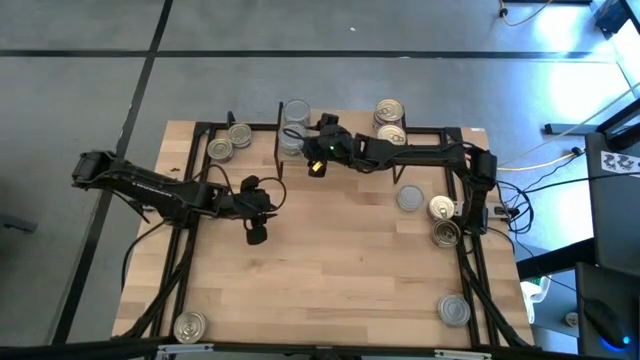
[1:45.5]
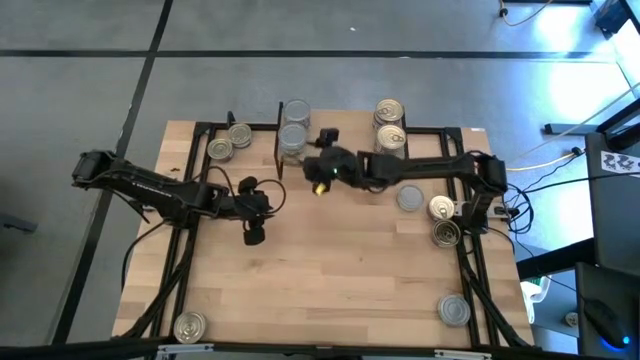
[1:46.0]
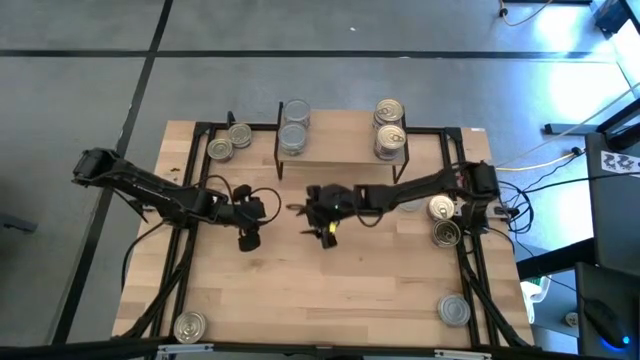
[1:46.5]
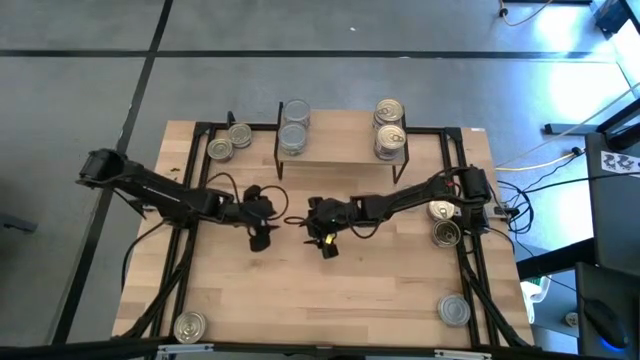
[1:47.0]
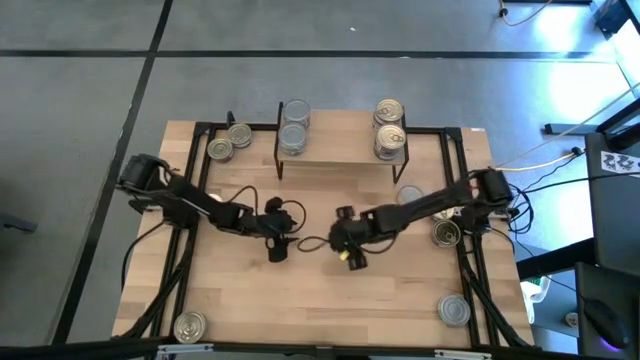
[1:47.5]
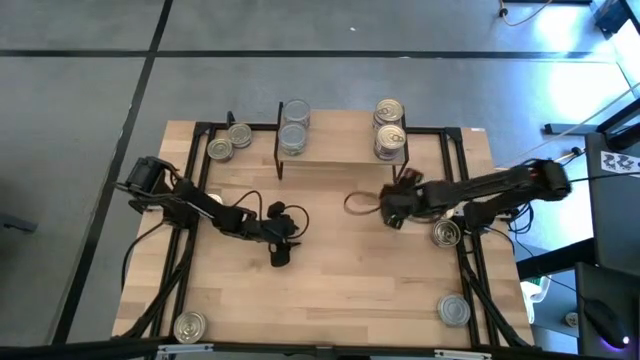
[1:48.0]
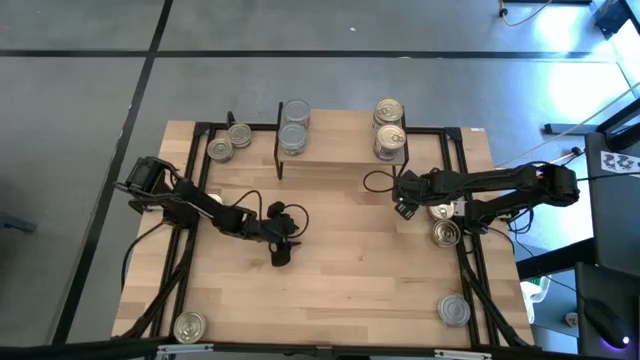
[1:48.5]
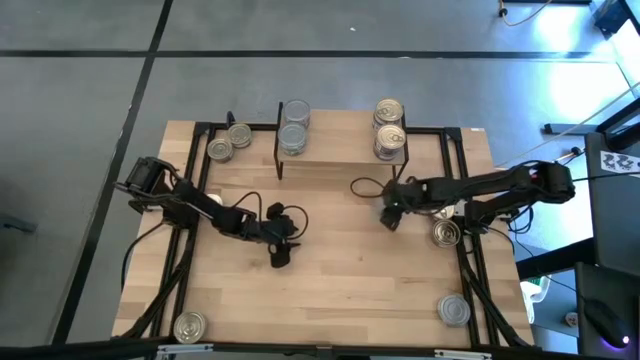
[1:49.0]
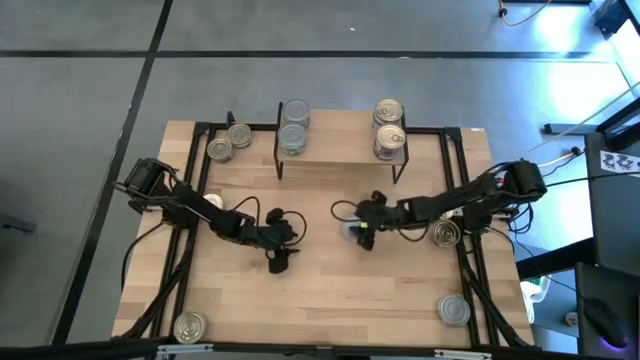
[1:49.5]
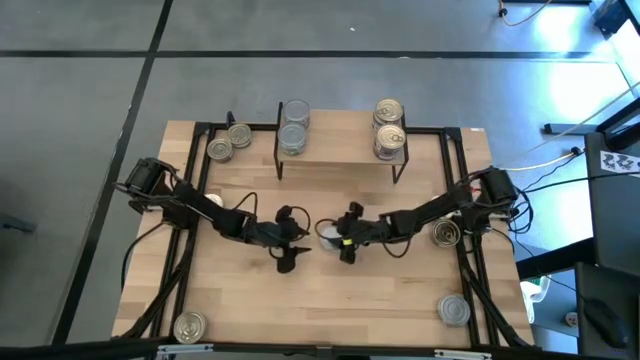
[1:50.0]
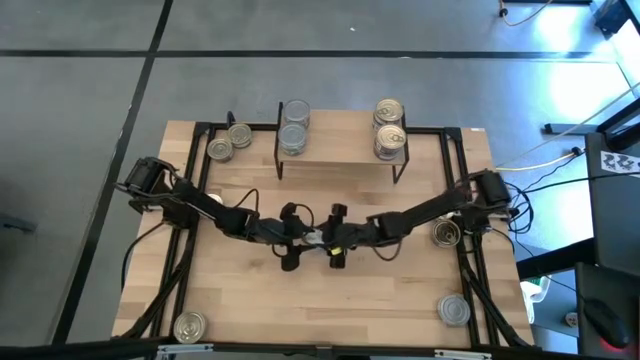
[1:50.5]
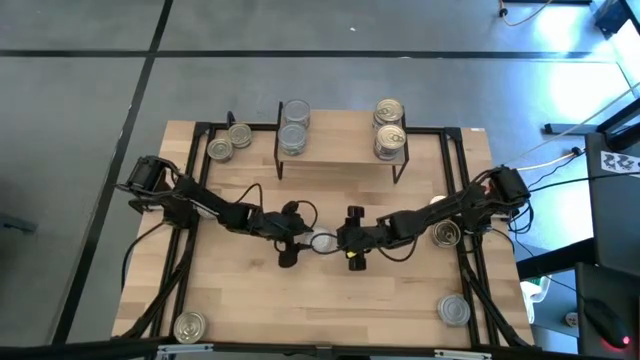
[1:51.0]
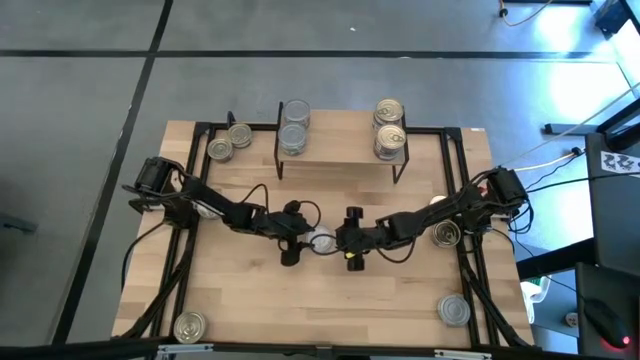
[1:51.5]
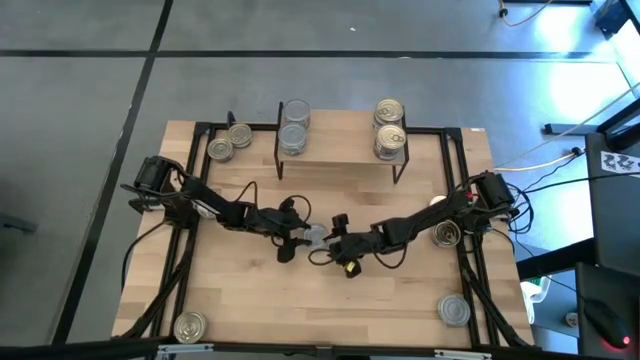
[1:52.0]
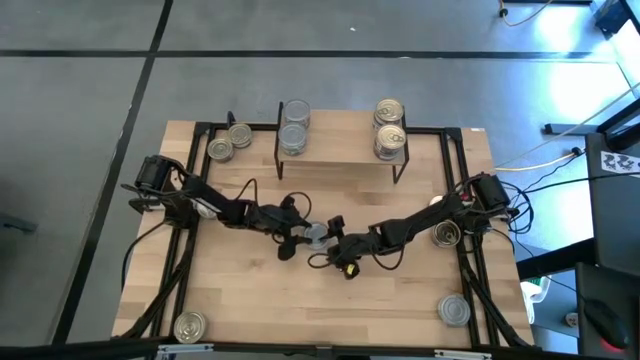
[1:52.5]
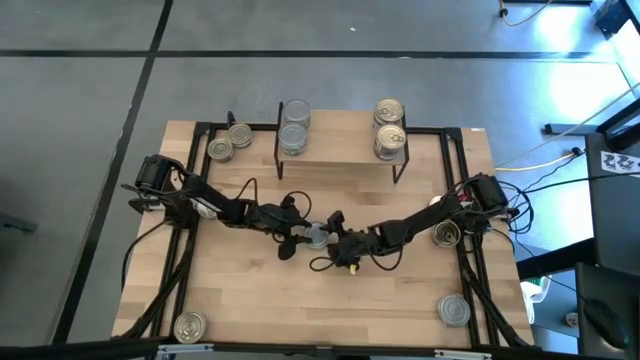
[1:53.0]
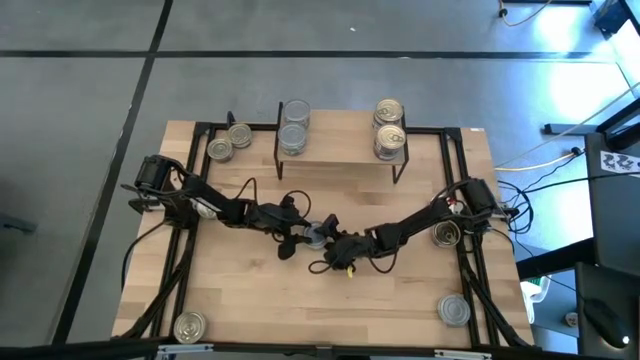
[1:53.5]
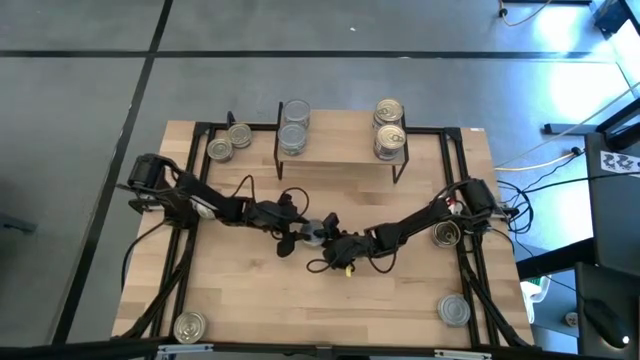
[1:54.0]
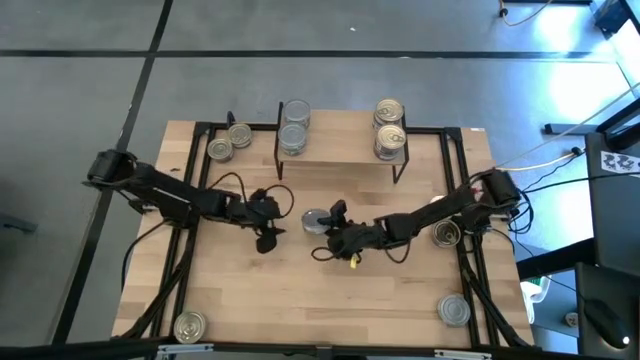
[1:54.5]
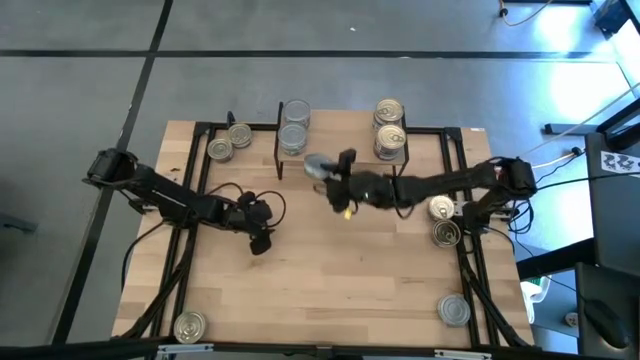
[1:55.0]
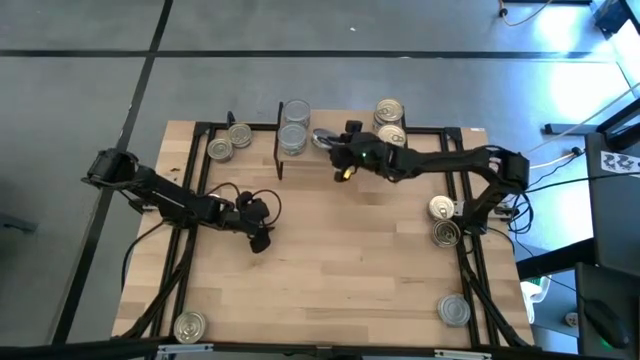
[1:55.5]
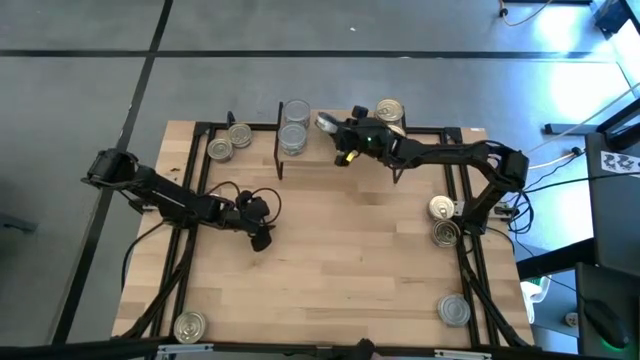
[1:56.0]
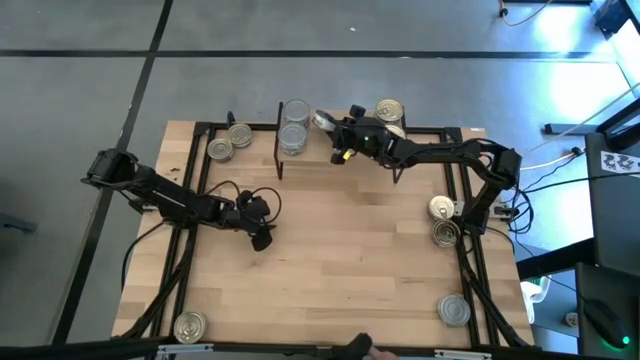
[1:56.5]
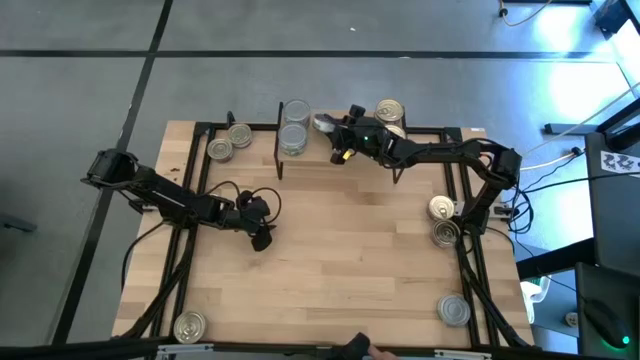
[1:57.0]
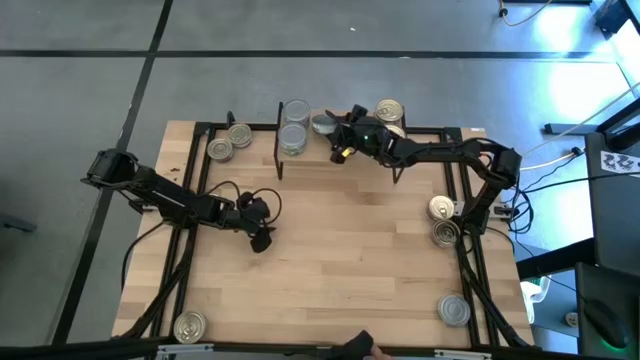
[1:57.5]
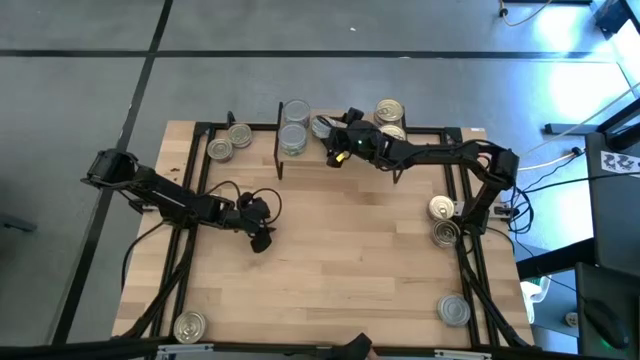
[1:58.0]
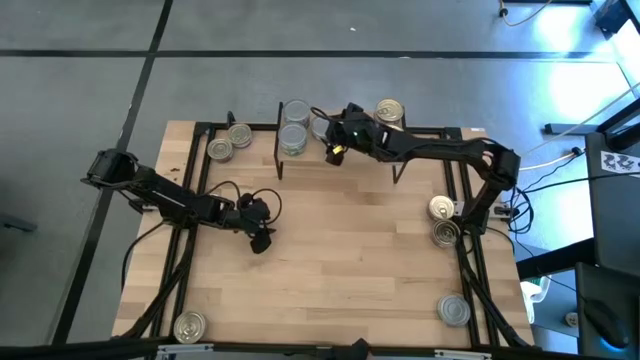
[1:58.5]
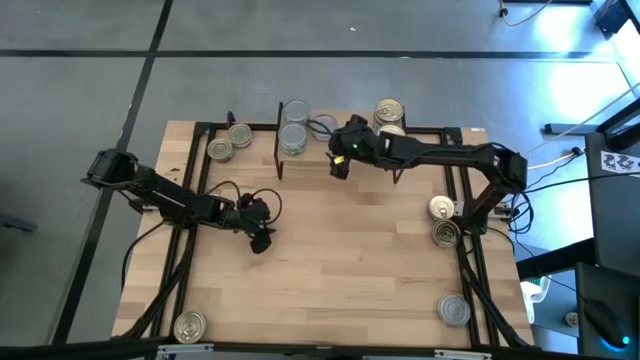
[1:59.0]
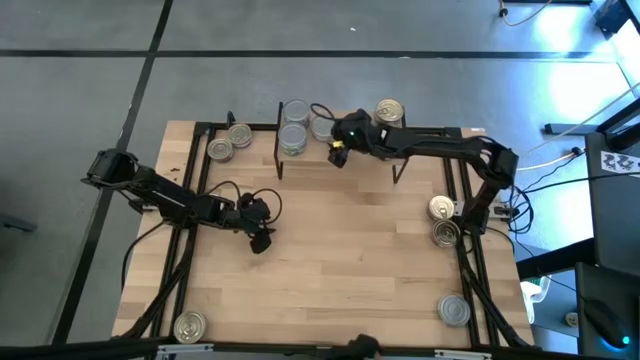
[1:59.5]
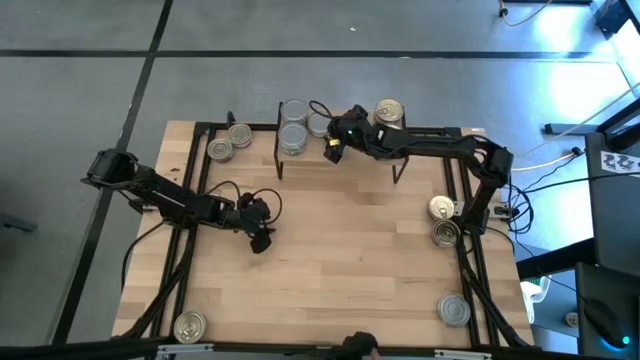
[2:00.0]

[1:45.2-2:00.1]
Task: Stack canned seafood by type on shelf
Put the green white tuna can on the shelf

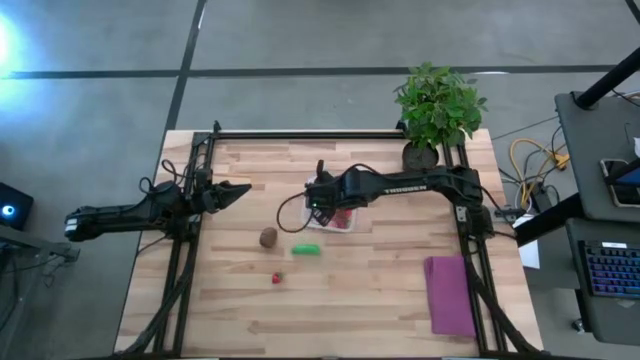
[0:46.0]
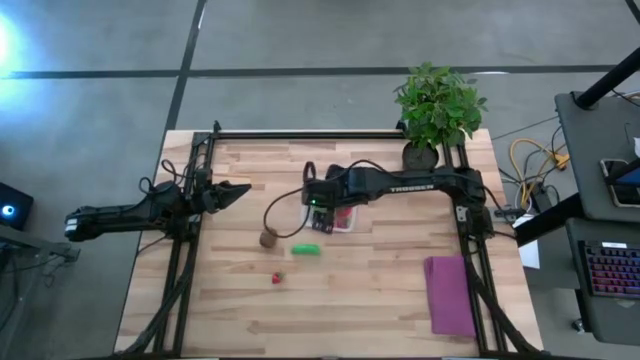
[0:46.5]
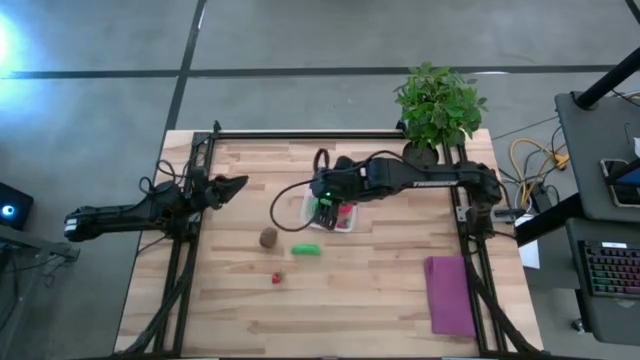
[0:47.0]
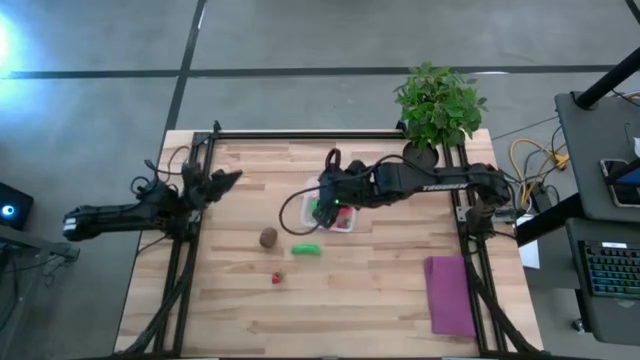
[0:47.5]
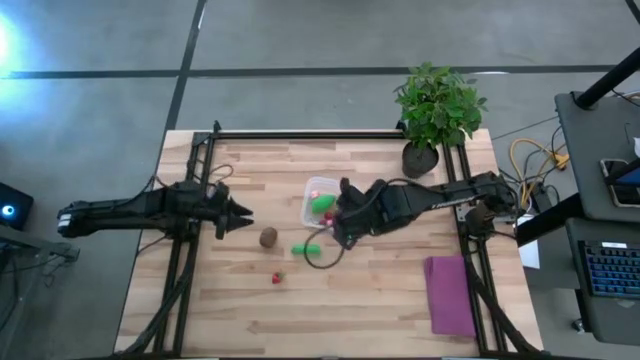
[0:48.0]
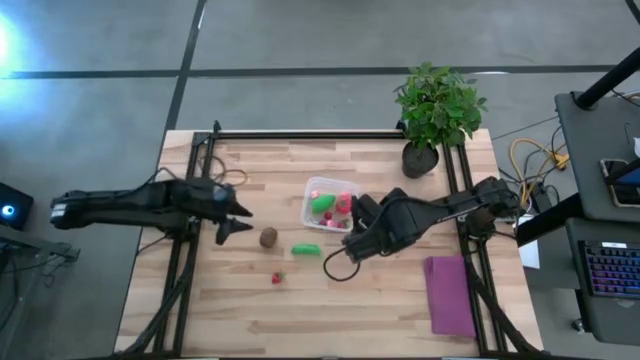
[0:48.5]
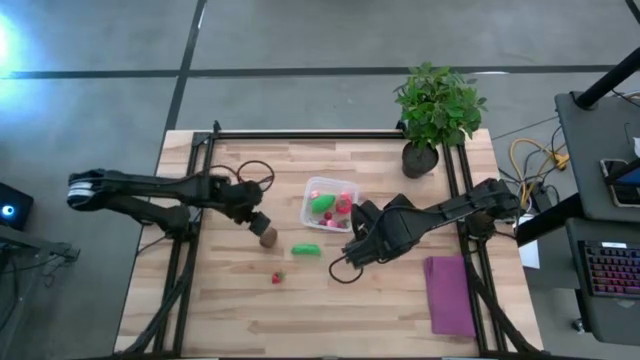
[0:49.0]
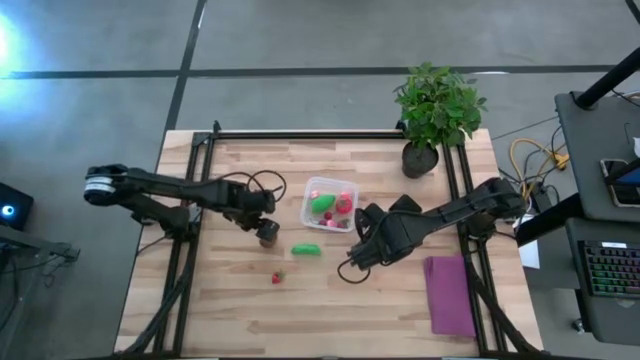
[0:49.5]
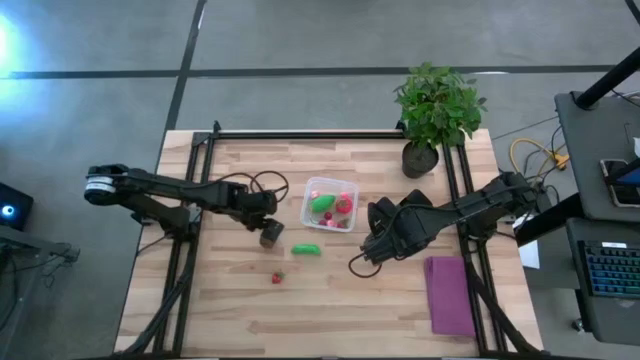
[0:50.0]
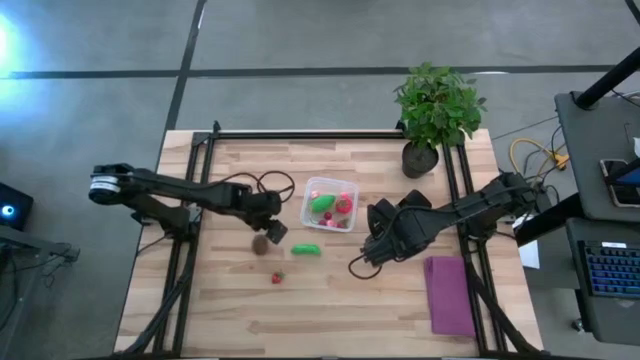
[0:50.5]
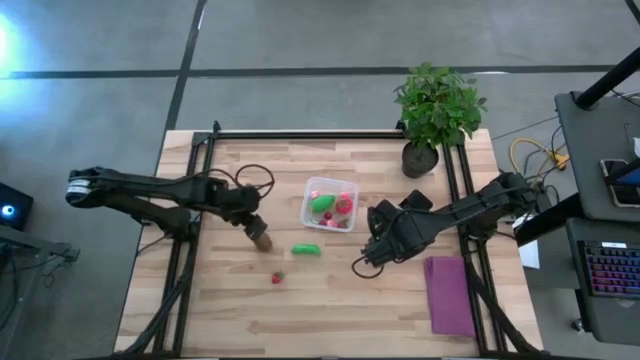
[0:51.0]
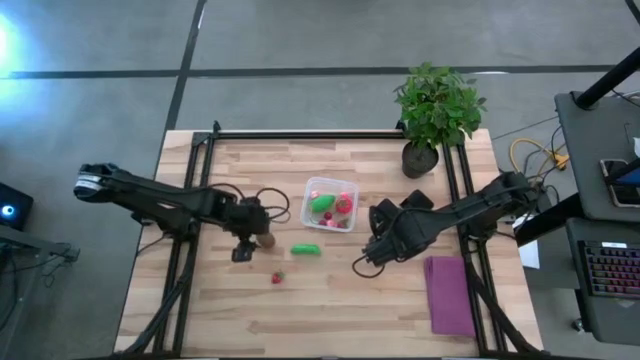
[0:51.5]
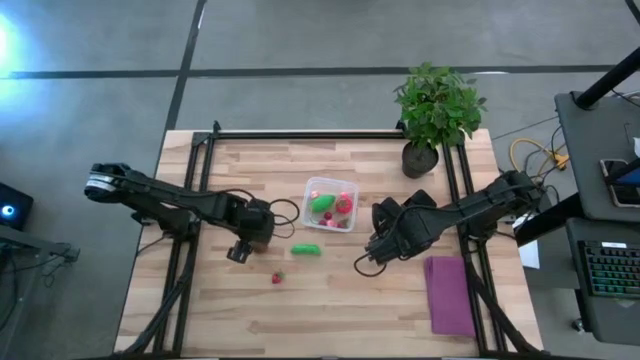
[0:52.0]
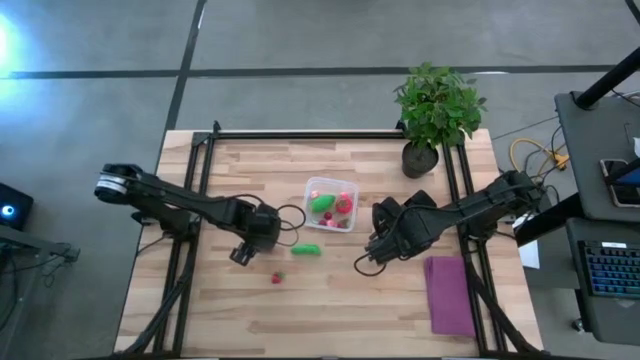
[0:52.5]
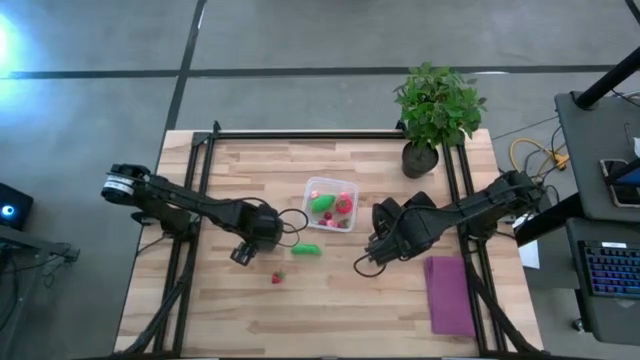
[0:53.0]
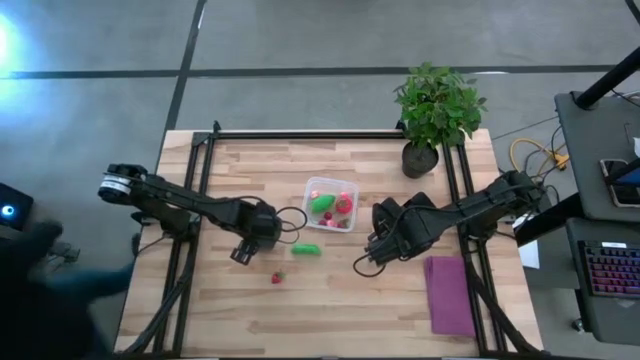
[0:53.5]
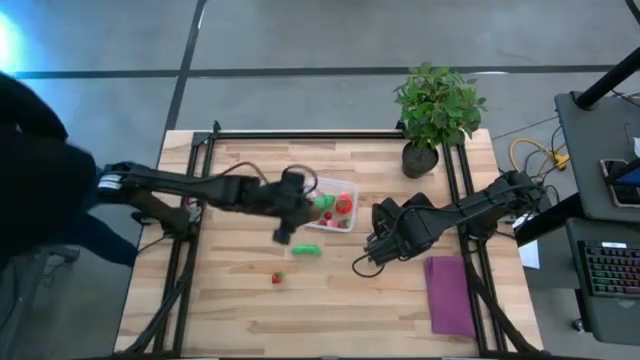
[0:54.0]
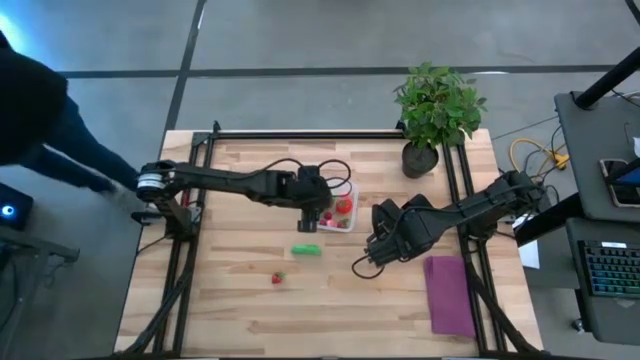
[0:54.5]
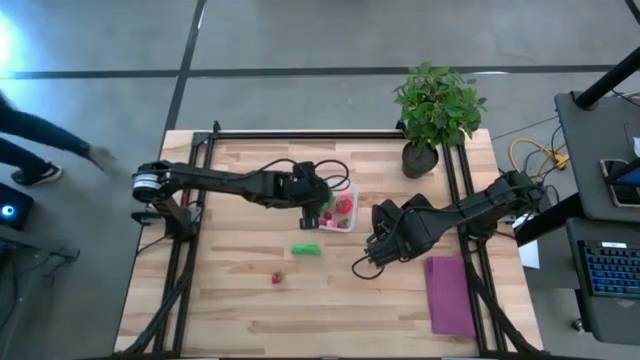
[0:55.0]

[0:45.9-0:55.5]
Task: Pick and placing Produce into tupperware
Put the brown kiwi into the transparent bin
